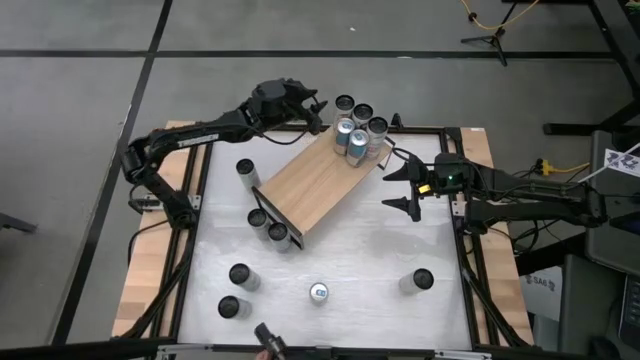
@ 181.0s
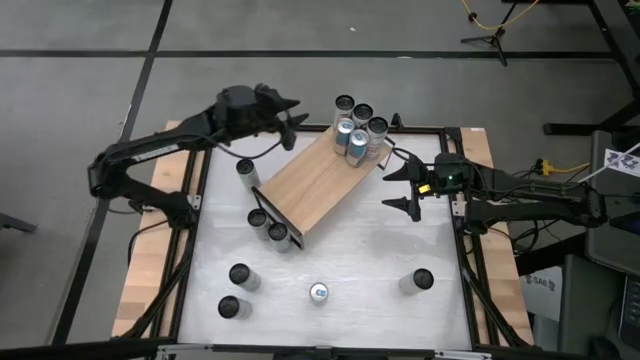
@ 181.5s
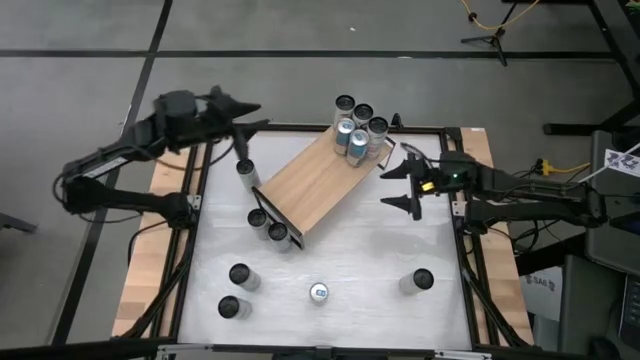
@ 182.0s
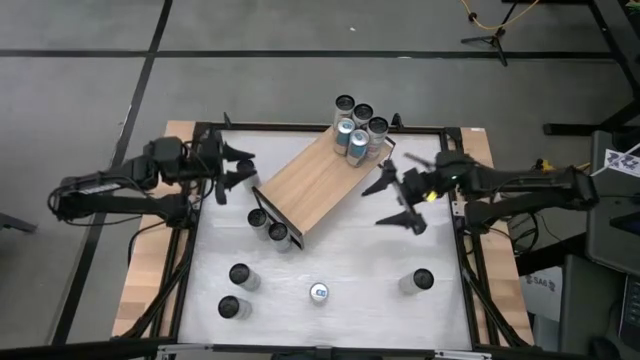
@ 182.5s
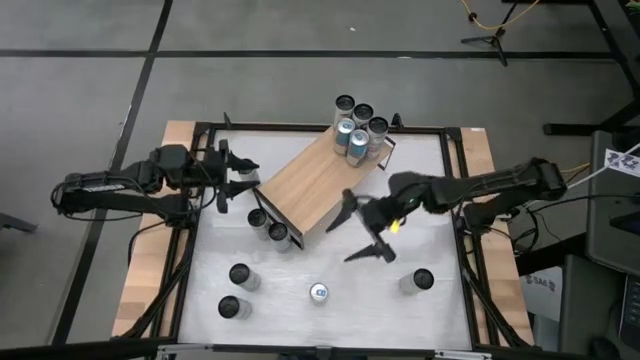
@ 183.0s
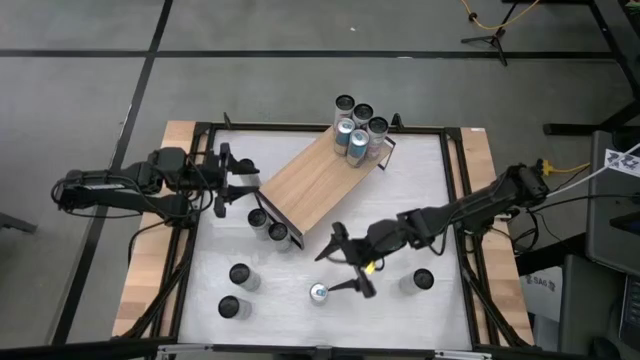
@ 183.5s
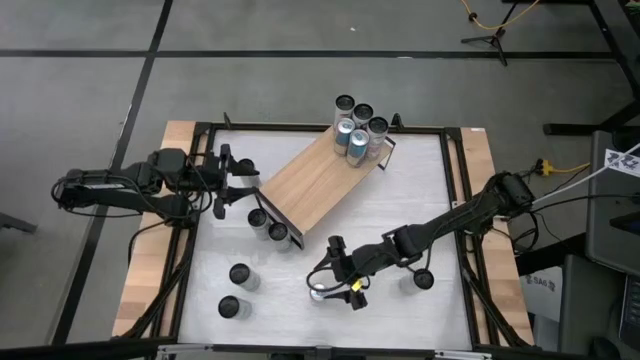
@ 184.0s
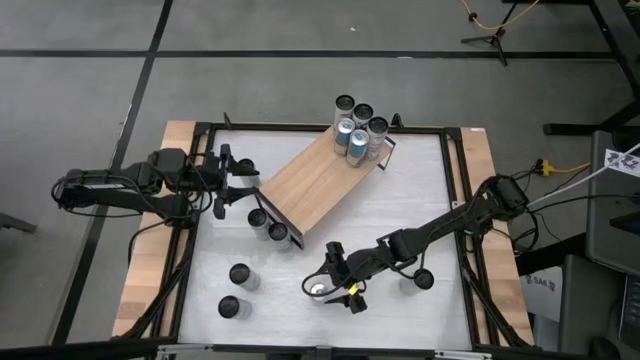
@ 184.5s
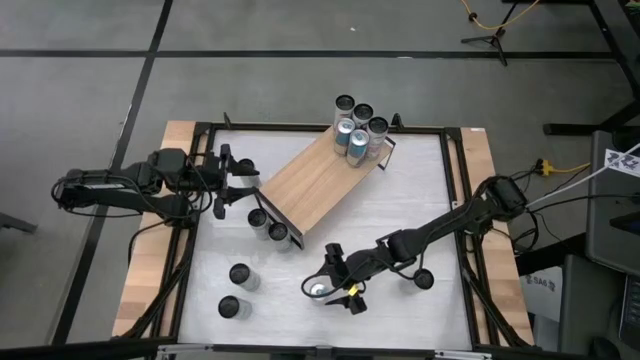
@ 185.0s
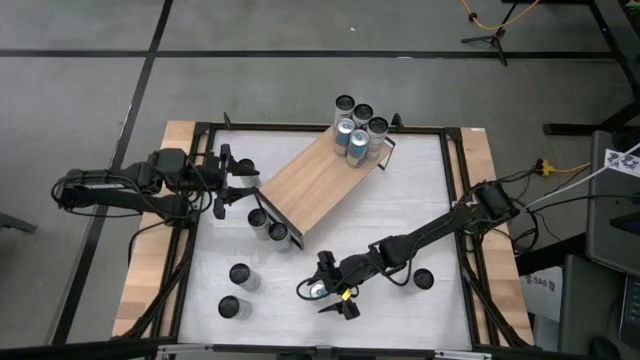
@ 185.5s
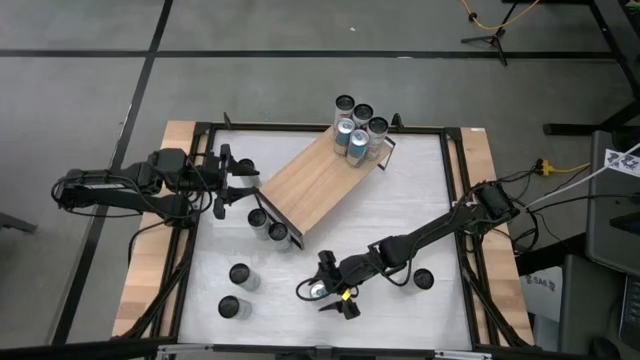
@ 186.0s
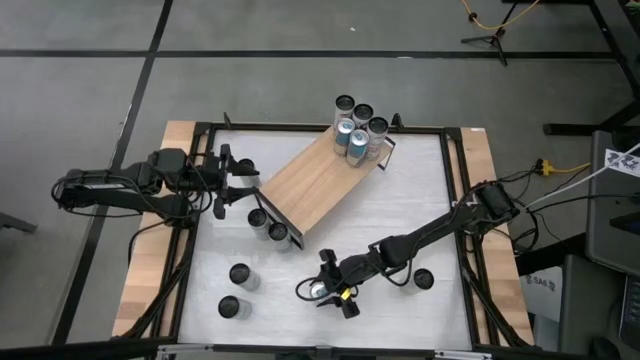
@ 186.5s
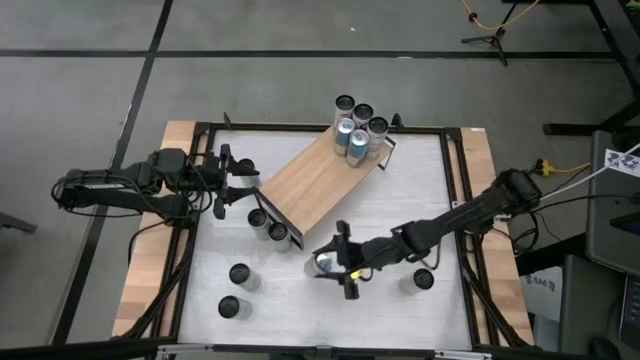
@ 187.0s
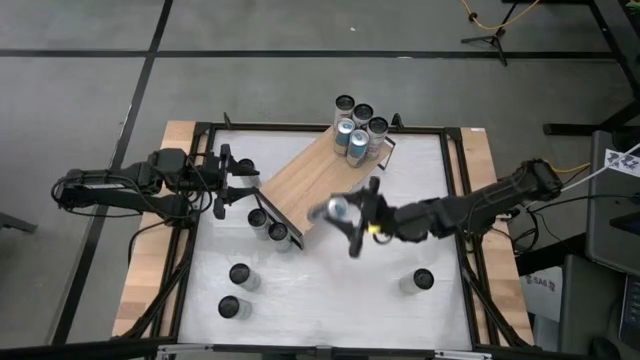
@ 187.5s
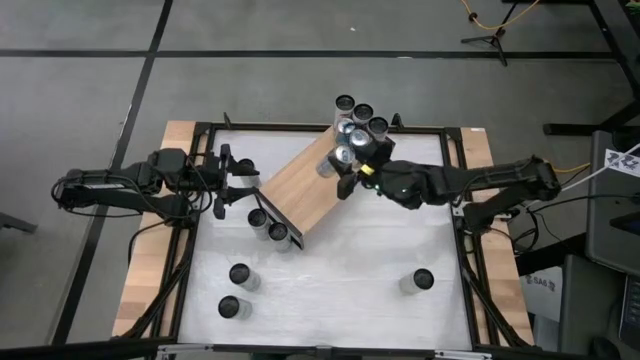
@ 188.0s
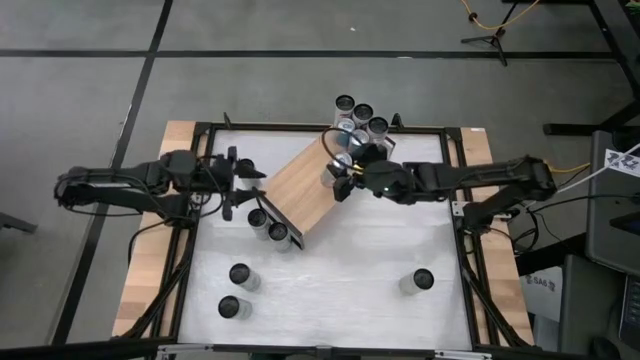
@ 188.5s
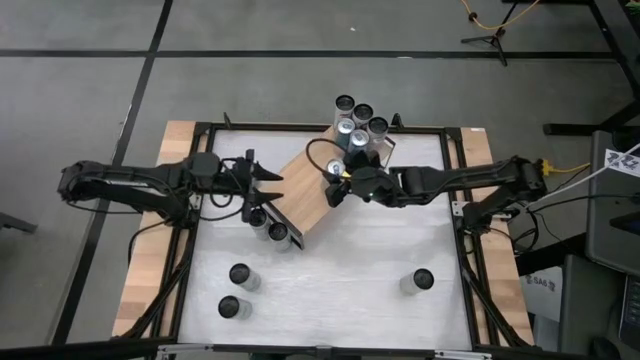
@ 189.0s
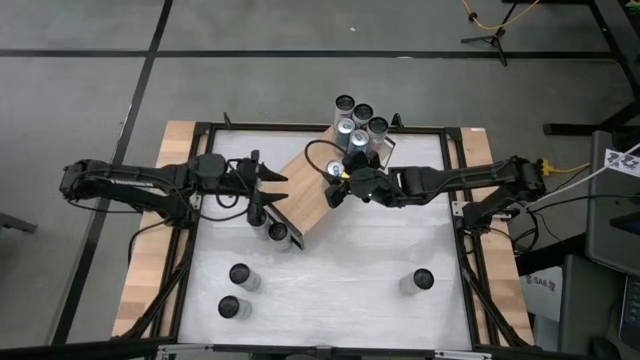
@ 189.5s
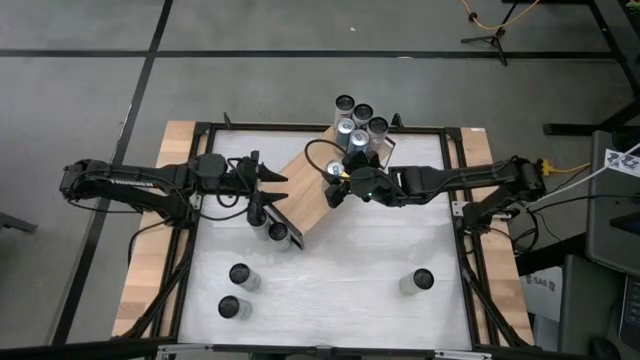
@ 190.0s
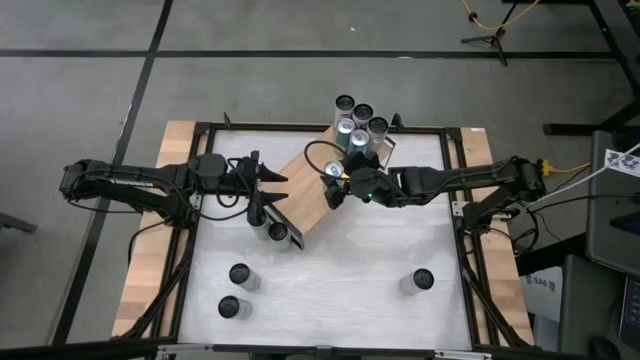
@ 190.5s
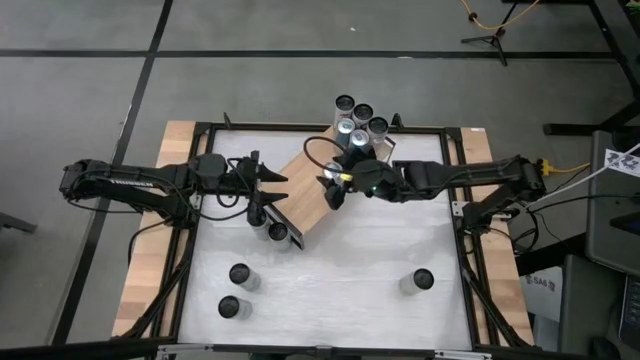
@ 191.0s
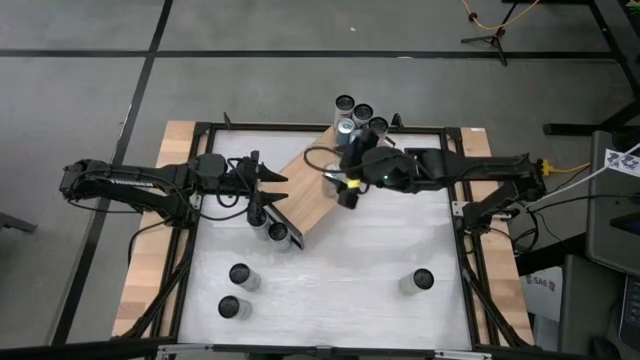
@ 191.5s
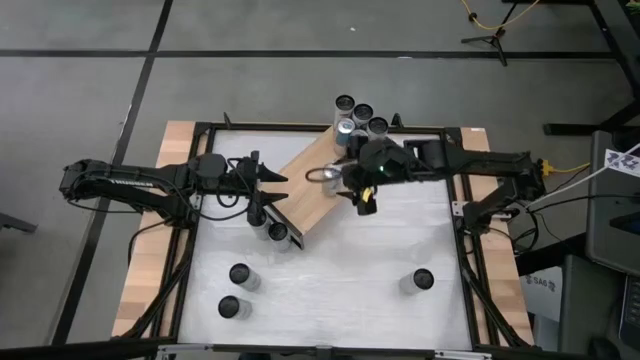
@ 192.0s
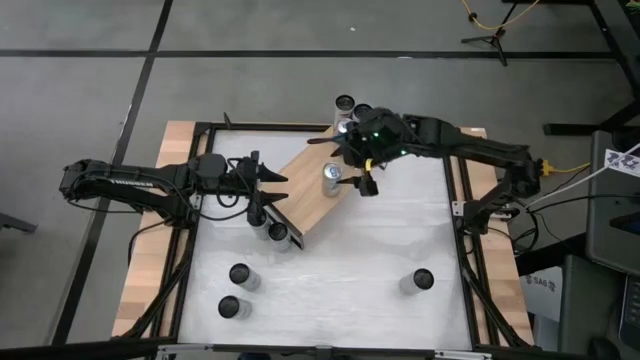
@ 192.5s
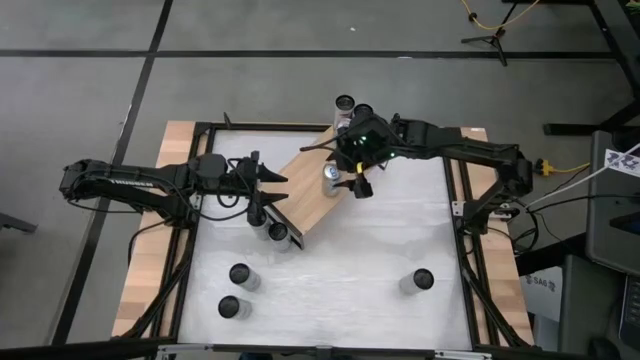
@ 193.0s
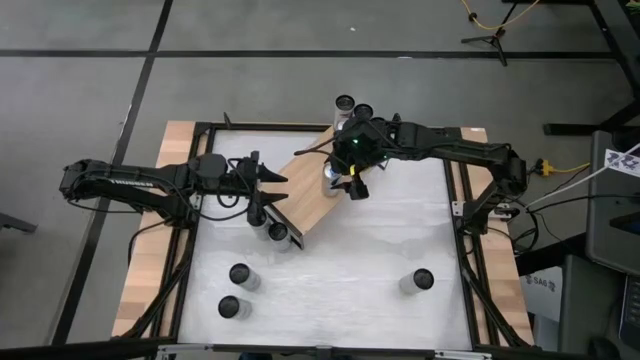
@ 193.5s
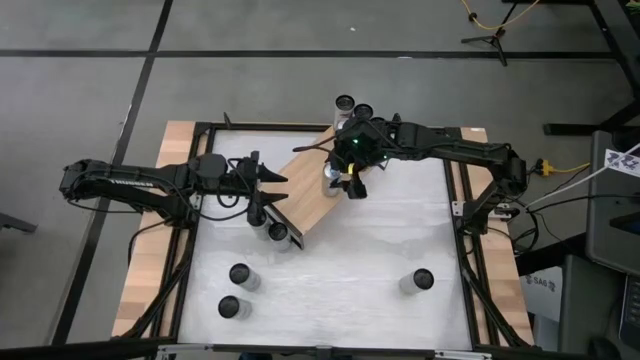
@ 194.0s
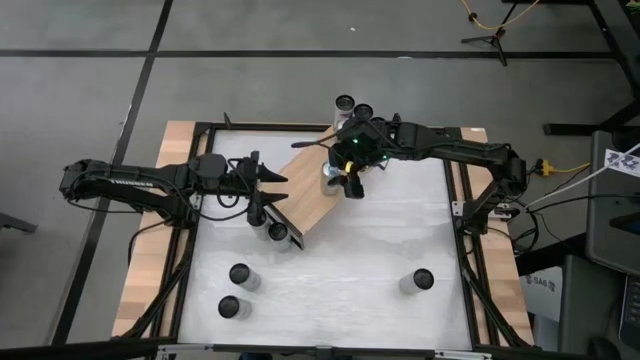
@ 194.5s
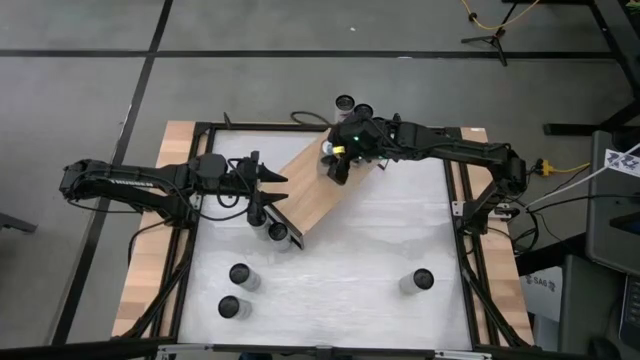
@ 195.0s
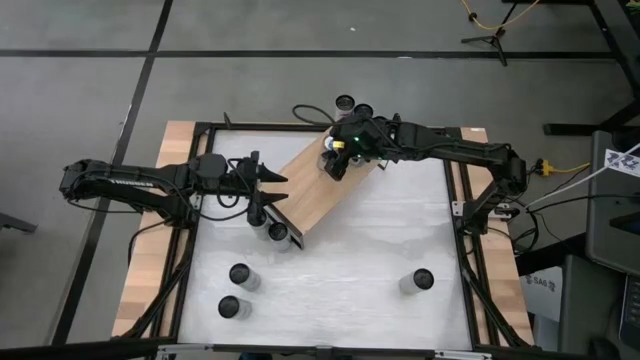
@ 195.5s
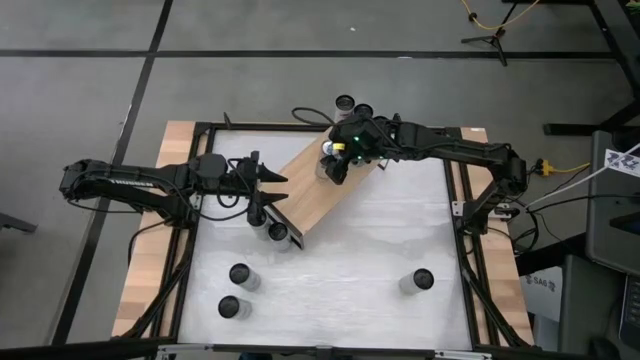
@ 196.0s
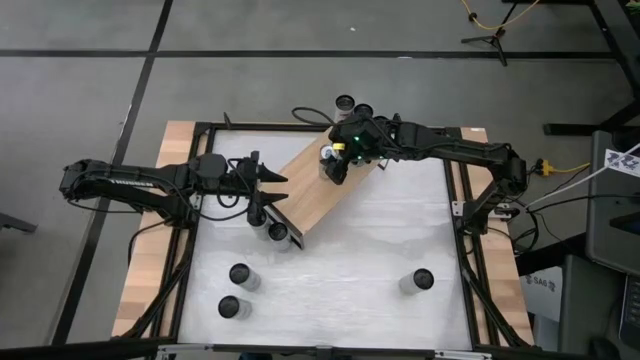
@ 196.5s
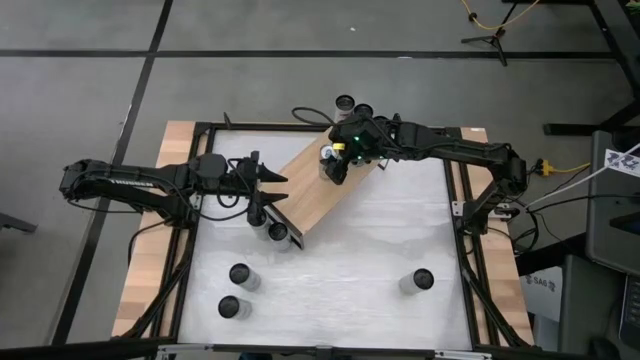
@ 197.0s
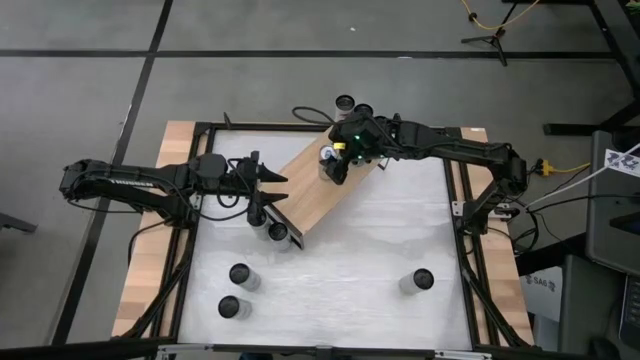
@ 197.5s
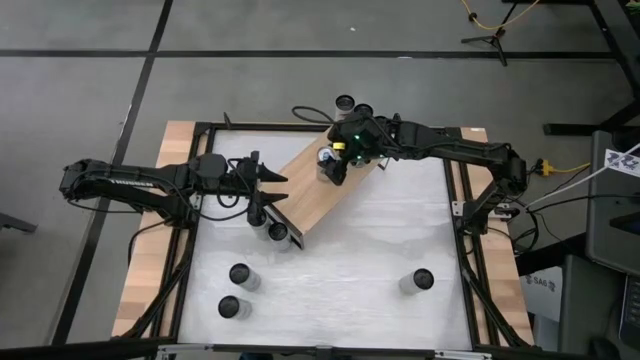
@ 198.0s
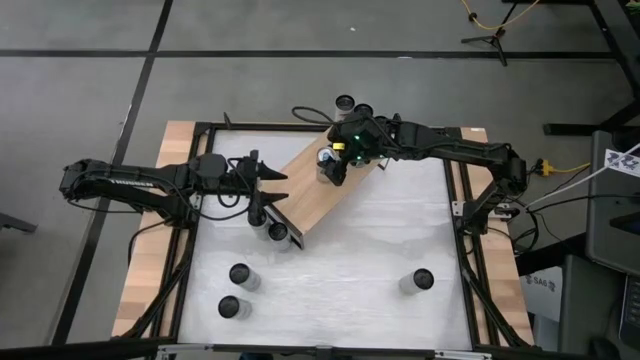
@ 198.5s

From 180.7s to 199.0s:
Task: Place canned beverage on shelf
Put the blue soda can on the shelf aligned with the other blue soda cans

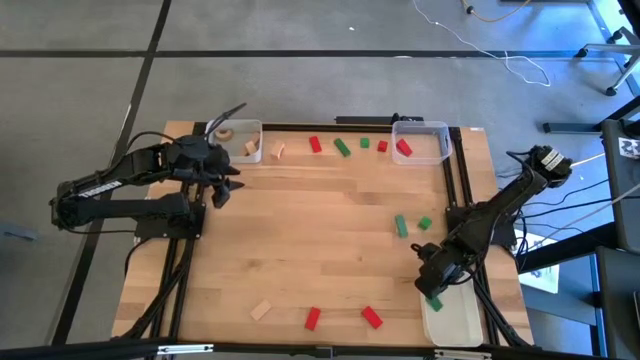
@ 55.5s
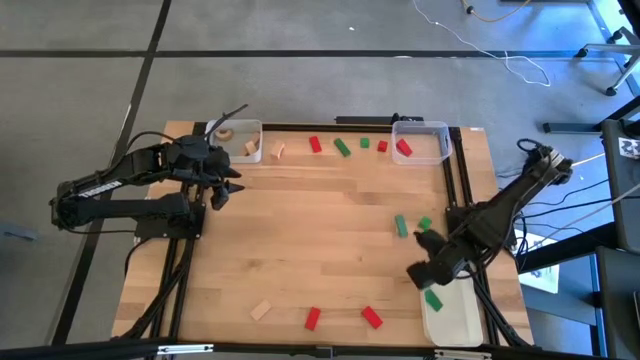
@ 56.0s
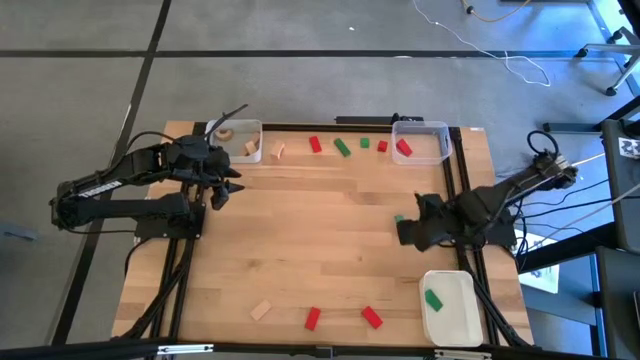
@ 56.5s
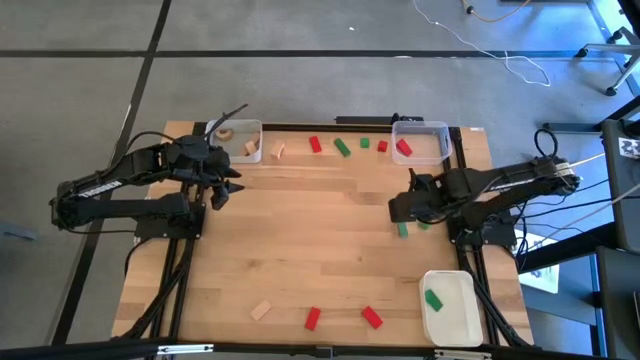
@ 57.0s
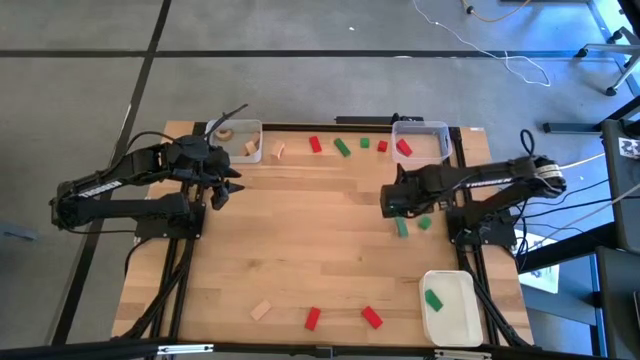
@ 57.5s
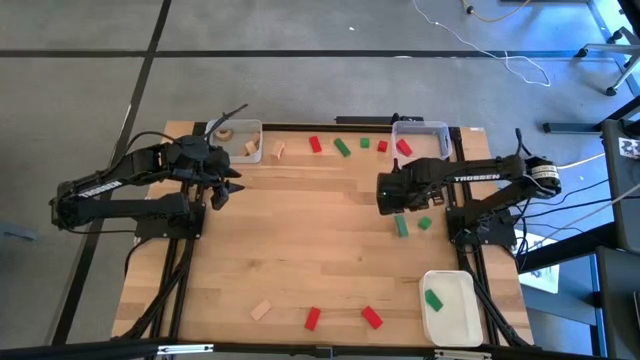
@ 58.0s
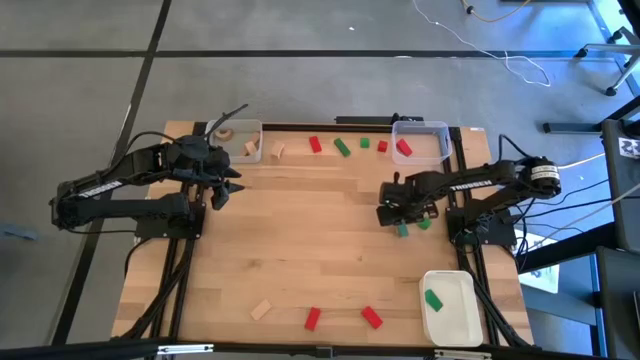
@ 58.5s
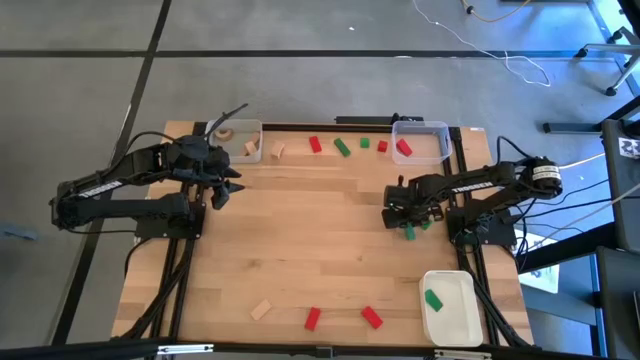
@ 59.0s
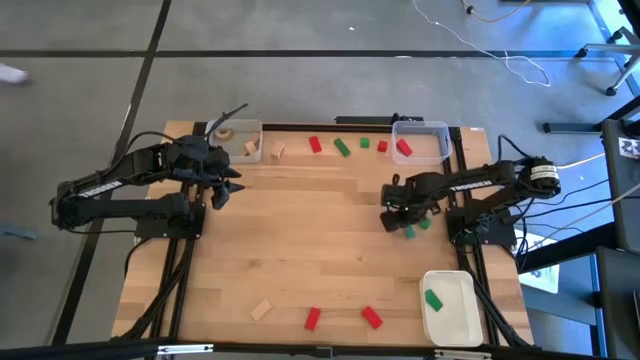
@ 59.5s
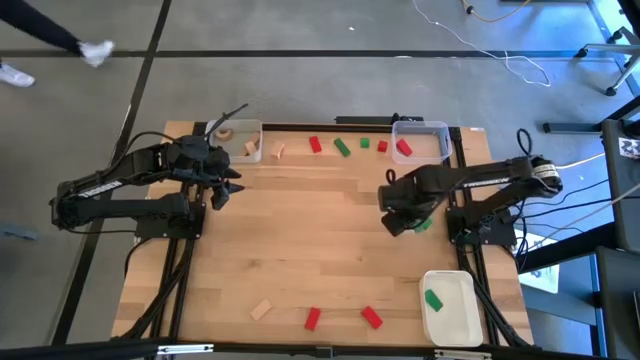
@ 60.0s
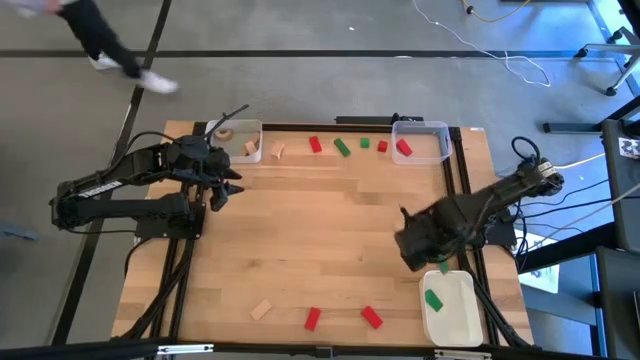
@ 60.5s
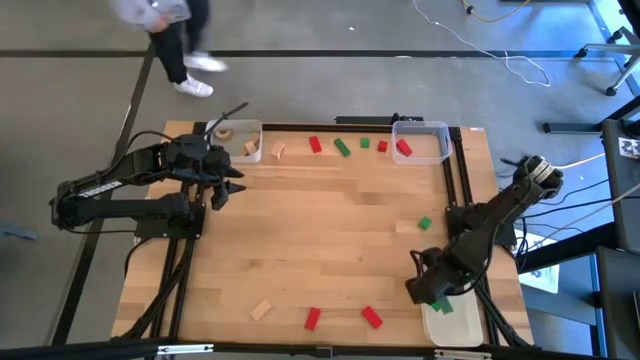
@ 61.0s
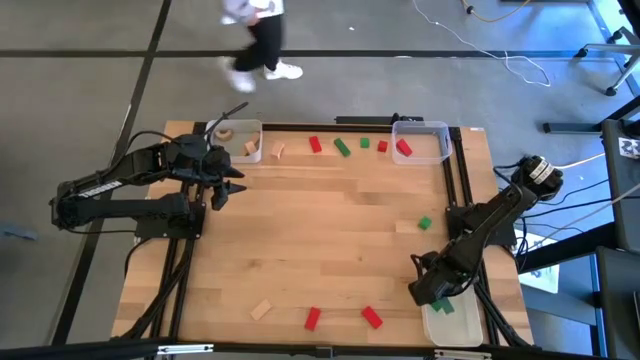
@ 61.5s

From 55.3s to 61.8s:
Task: Sort & place blocks by color
Put the dark green block into the white bin
